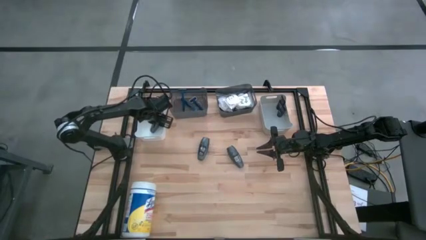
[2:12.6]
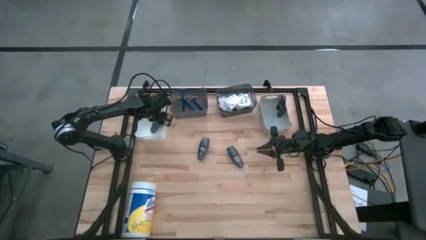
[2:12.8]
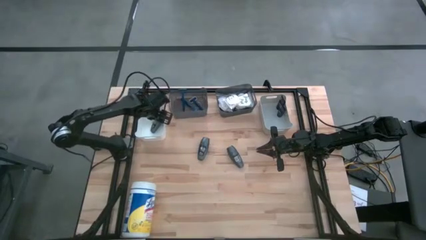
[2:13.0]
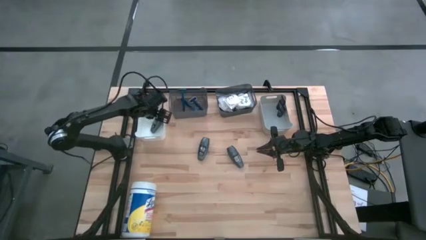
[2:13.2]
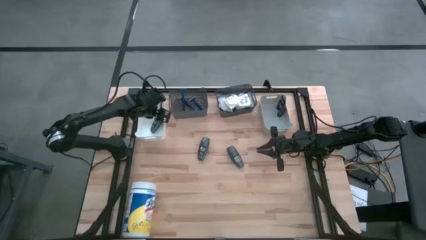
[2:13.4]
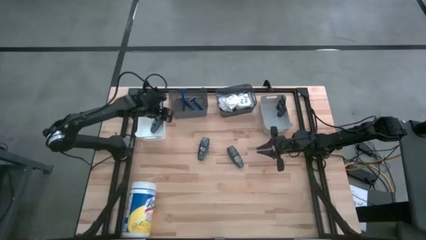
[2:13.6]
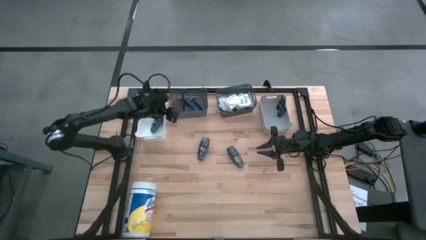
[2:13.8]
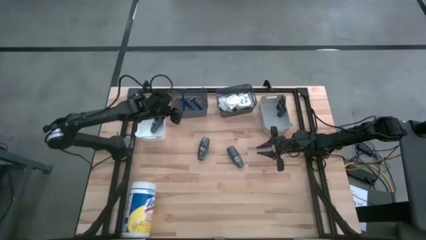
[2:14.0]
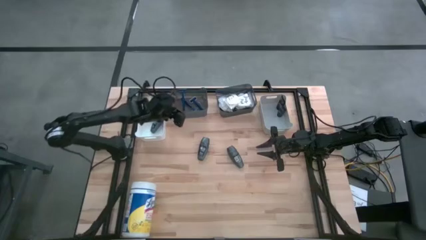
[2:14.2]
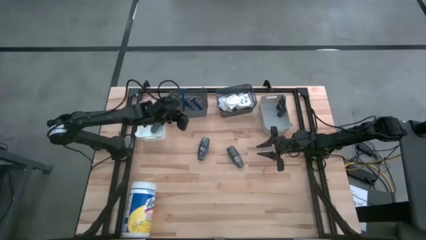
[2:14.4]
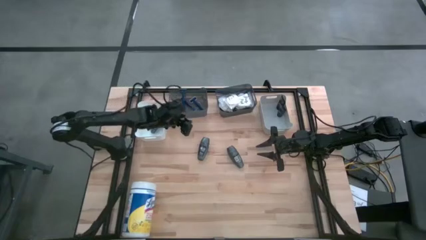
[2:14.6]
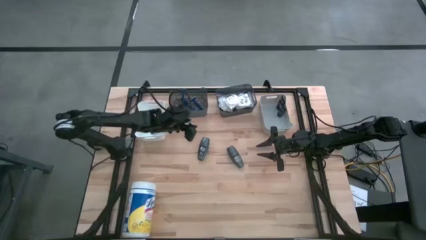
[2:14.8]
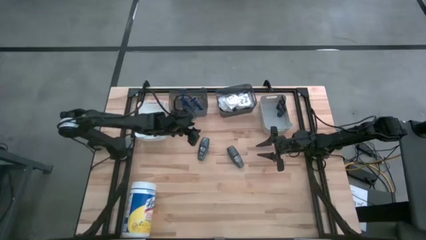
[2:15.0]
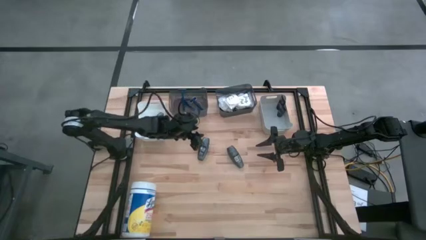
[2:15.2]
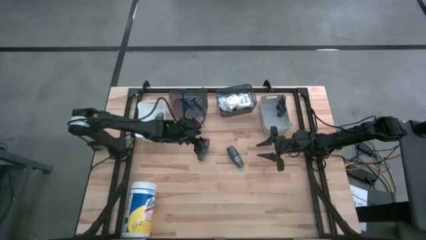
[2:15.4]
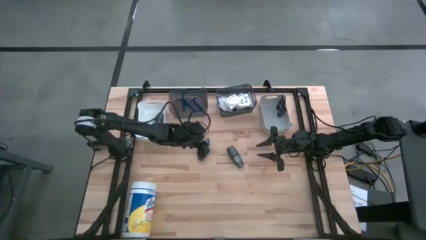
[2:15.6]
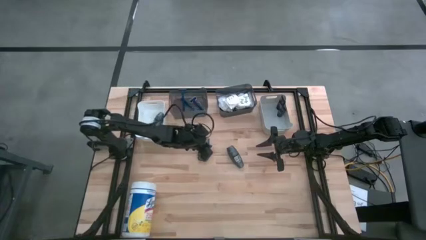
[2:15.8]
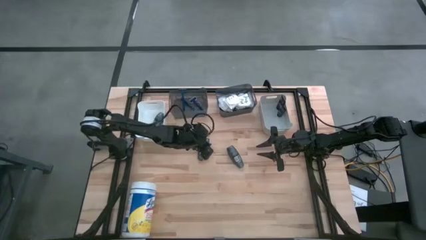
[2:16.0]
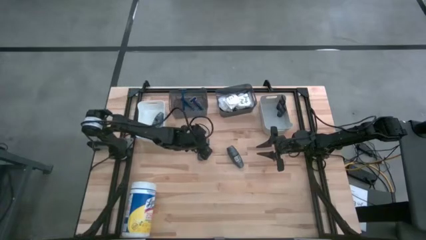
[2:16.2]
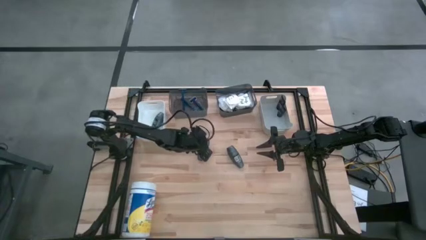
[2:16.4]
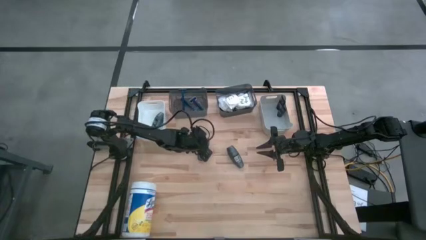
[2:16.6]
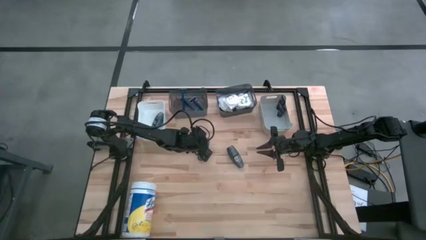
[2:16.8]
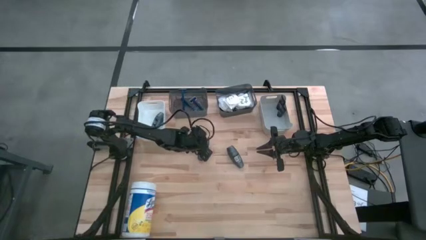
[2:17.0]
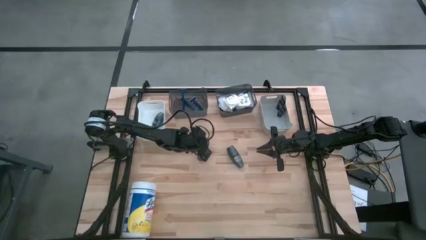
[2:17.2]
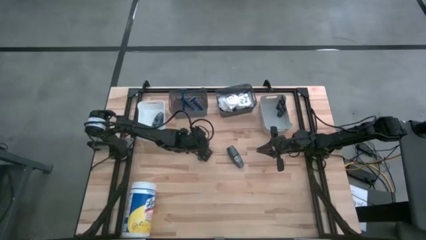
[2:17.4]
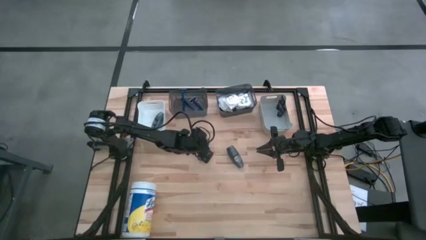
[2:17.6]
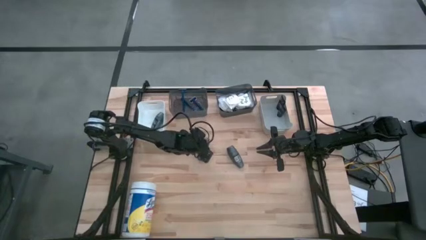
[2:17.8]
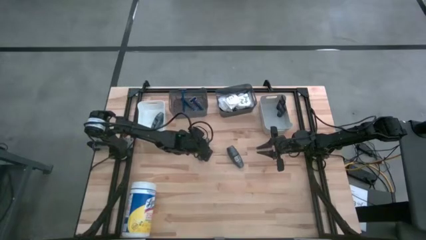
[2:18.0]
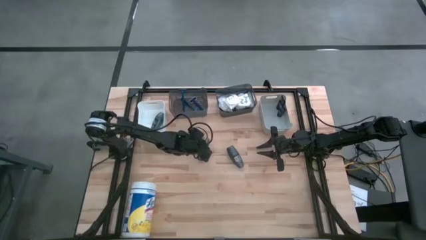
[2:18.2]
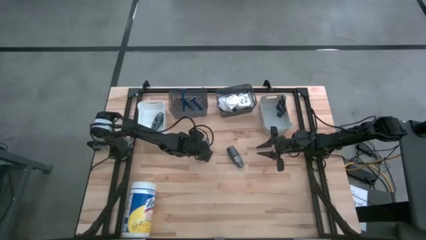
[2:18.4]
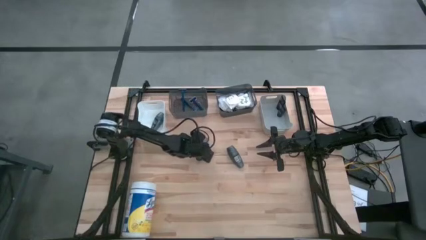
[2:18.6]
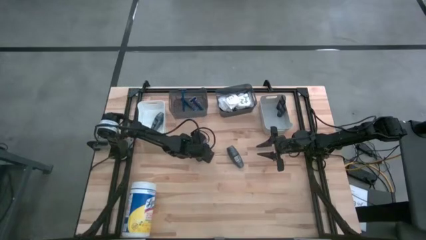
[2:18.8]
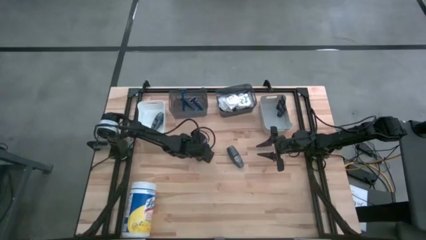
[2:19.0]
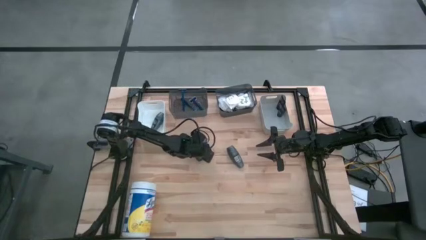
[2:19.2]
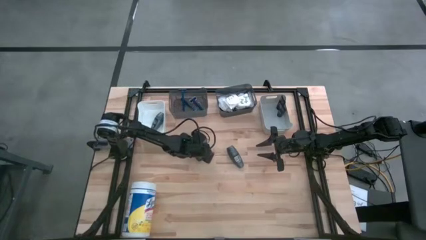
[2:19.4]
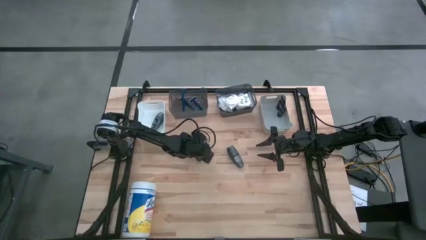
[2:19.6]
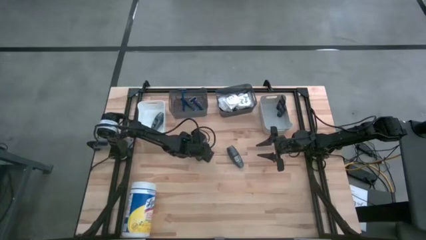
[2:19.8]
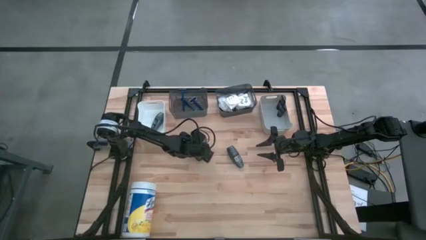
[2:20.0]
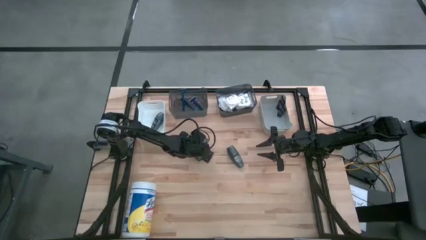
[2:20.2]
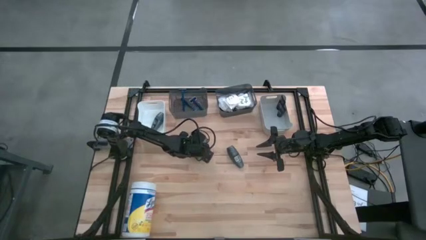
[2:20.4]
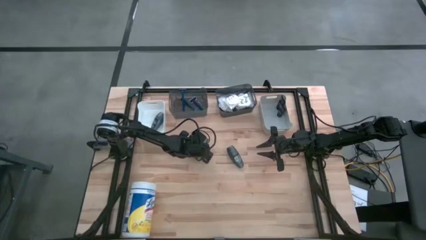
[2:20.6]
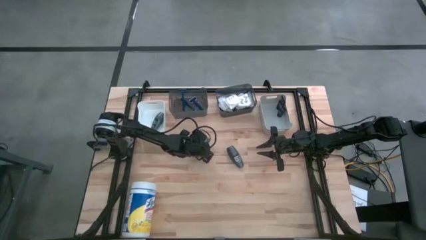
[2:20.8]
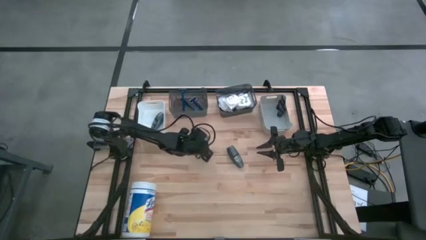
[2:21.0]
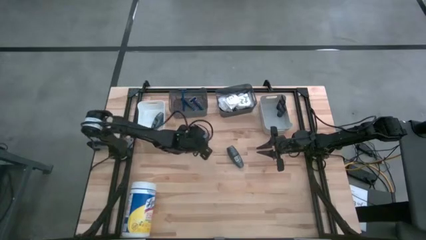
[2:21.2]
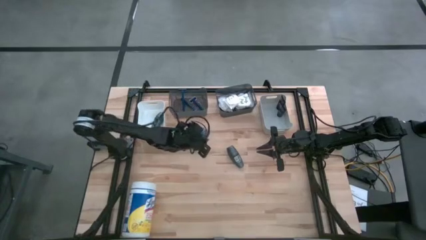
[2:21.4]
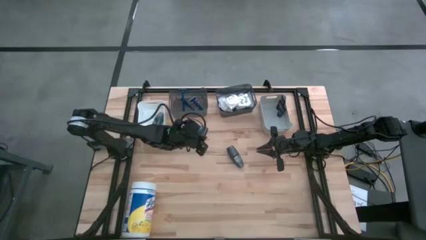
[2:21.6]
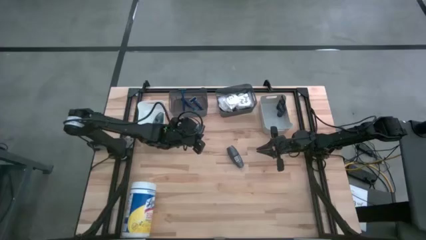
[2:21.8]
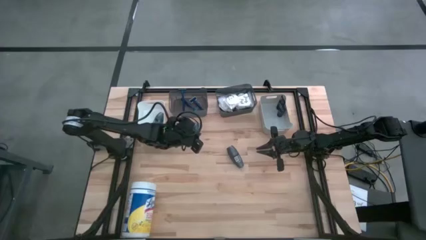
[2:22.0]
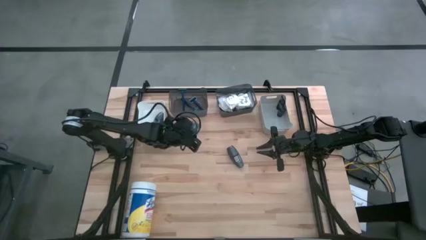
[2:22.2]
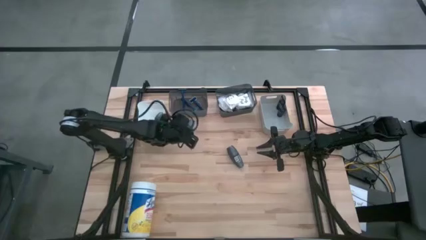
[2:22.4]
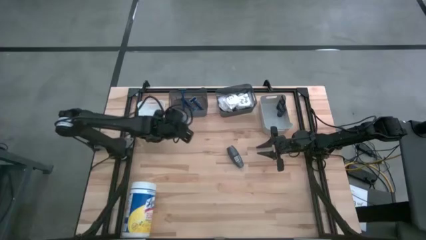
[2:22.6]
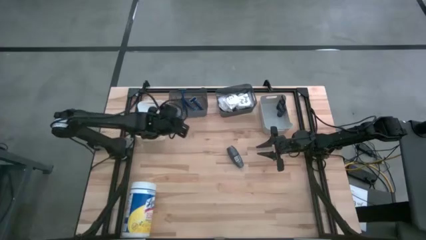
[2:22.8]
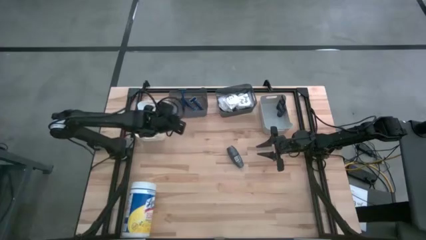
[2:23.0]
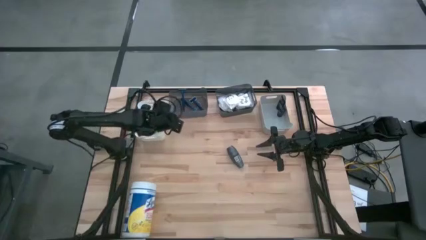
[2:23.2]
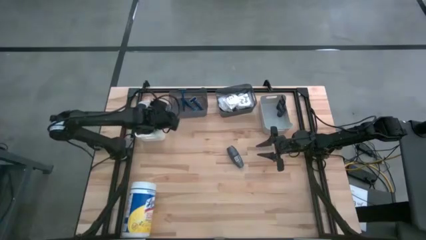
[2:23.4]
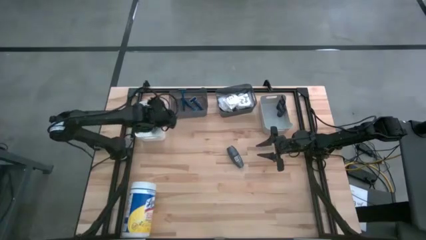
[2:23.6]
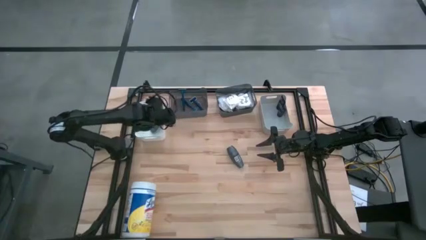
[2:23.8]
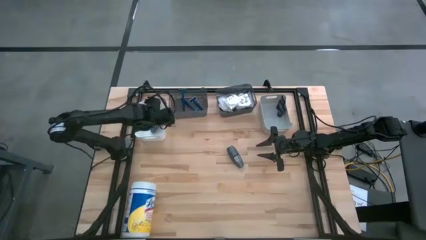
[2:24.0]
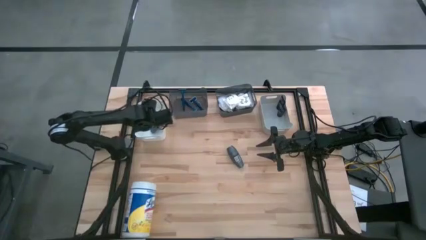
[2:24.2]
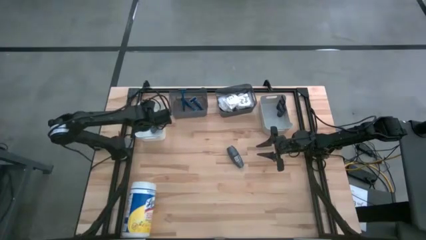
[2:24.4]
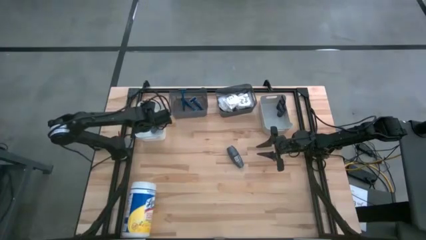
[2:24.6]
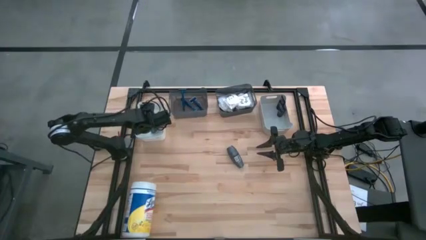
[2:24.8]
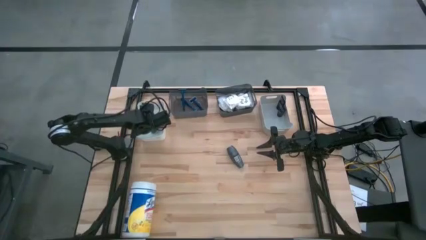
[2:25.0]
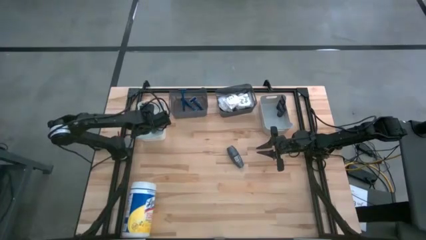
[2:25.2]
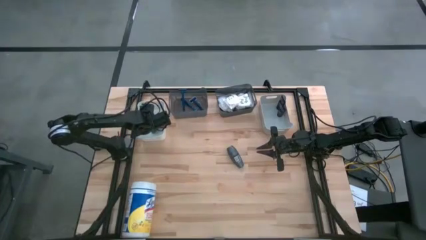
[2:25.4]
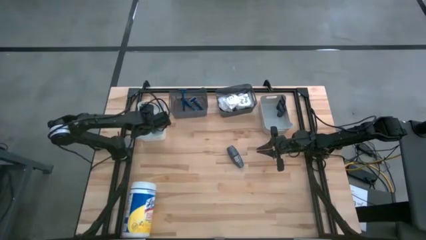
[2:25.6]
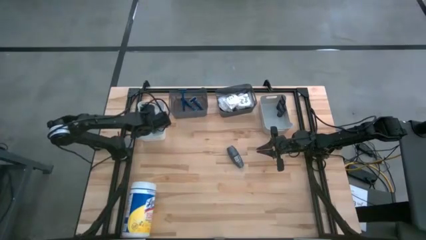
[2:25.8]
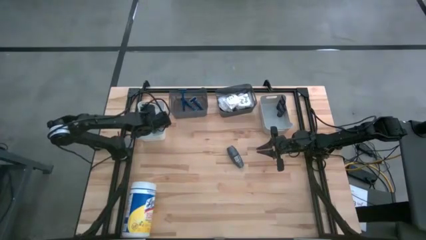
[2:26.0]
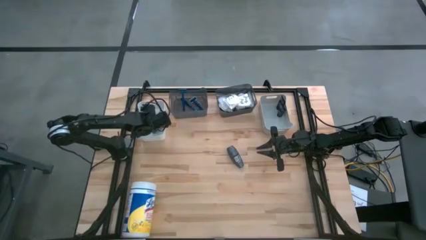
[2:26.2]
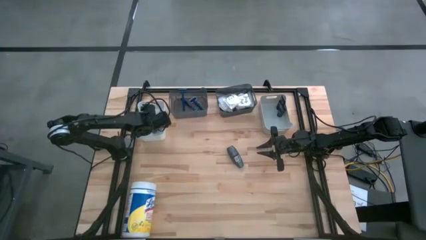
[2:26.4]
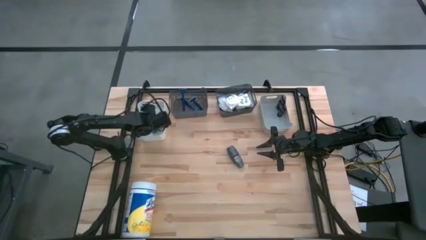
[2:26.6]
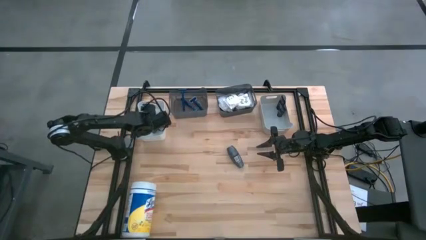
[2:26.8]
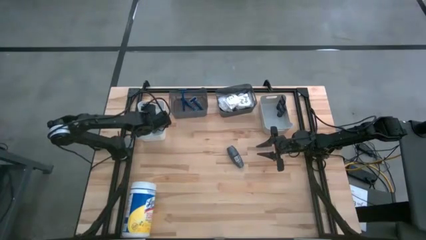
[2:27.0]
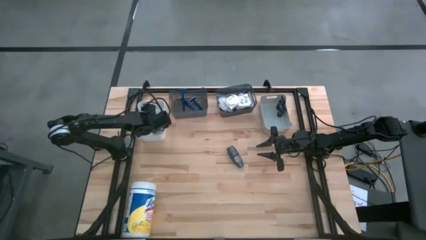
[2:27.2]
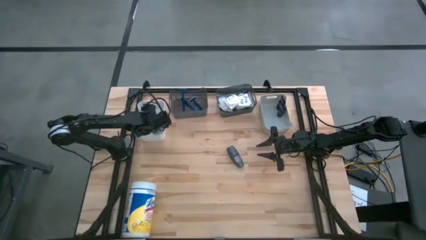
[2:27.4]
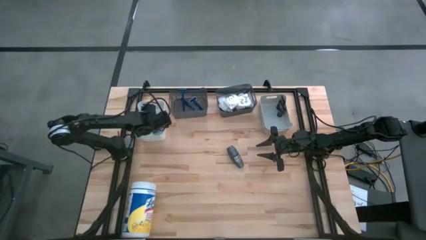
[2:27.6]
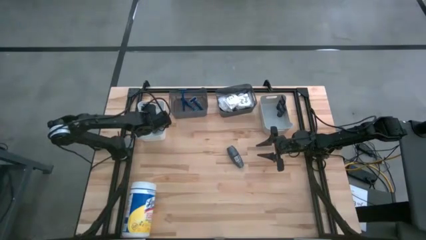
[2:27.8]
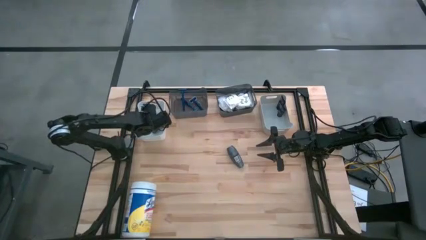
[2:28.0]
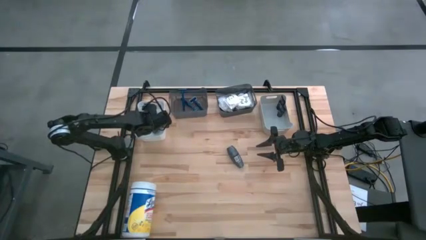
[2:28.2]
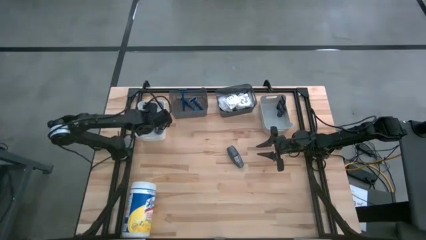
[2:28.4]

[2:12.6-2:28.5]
Task: Pick & Place Travel size toiletries
Put the black deodorant into the white bin
